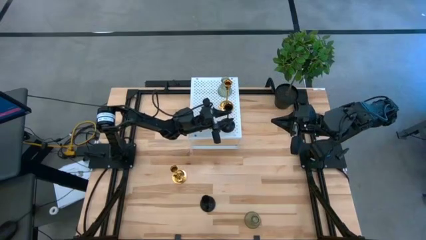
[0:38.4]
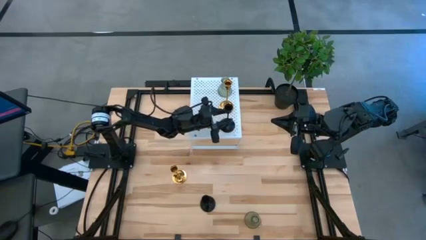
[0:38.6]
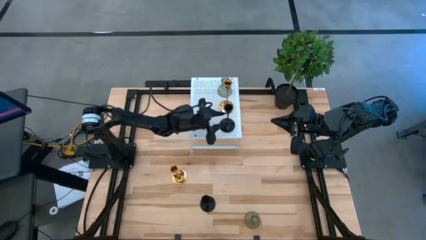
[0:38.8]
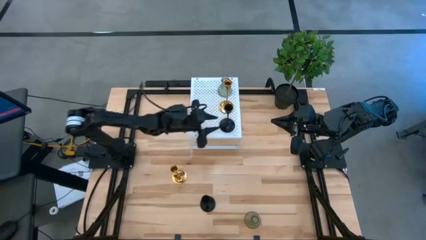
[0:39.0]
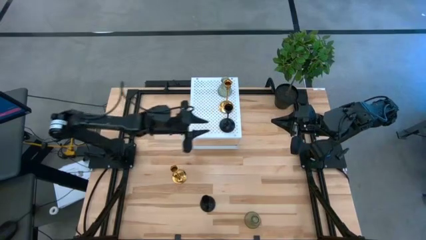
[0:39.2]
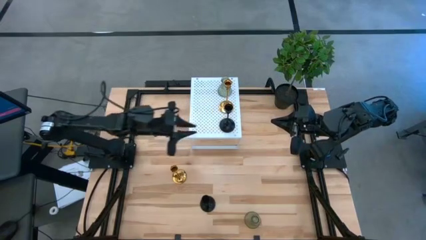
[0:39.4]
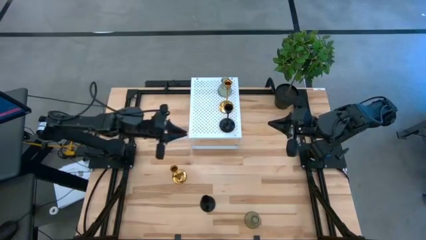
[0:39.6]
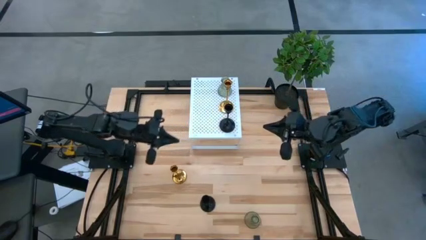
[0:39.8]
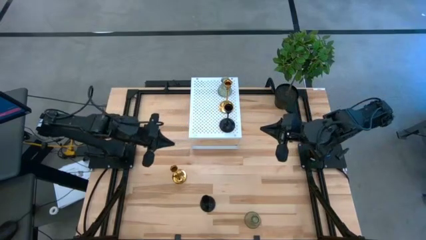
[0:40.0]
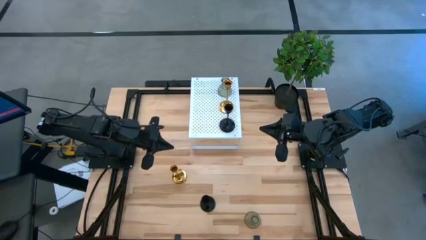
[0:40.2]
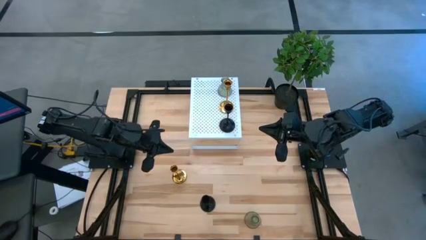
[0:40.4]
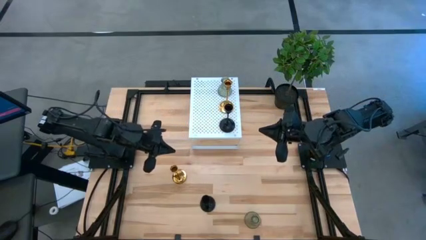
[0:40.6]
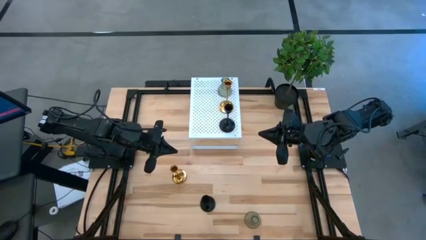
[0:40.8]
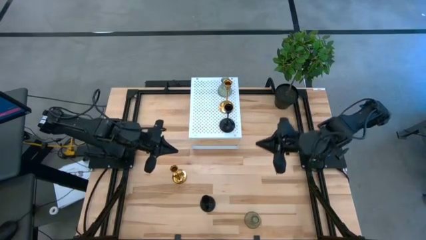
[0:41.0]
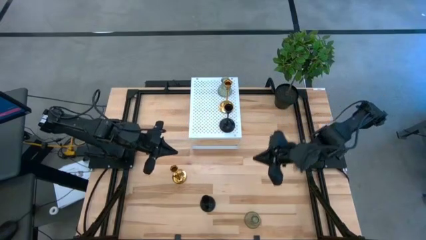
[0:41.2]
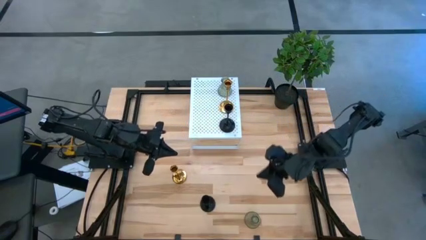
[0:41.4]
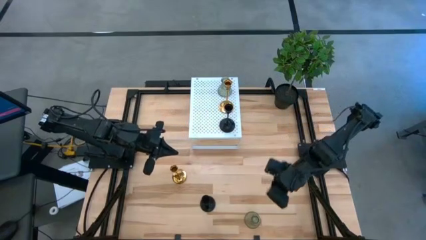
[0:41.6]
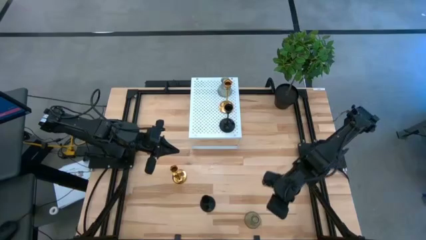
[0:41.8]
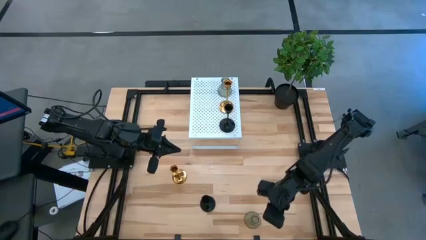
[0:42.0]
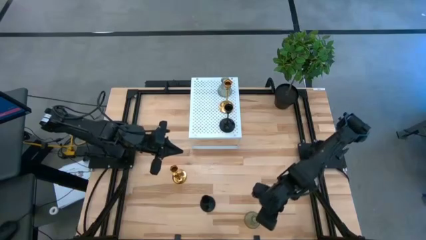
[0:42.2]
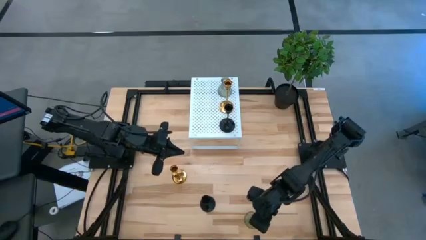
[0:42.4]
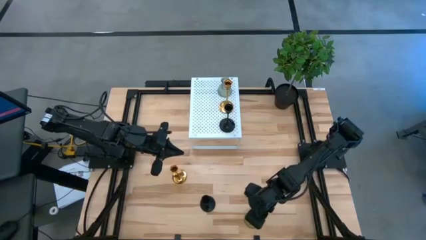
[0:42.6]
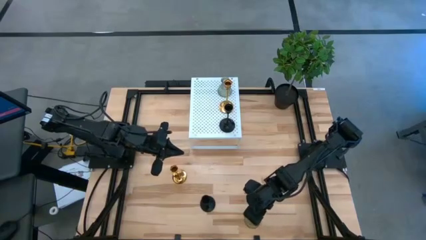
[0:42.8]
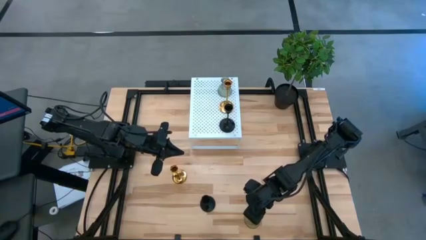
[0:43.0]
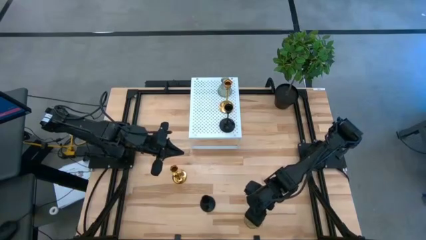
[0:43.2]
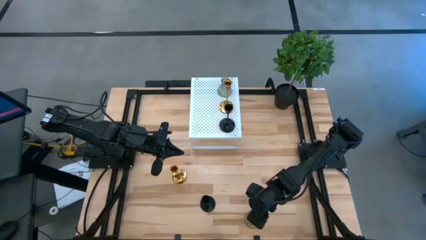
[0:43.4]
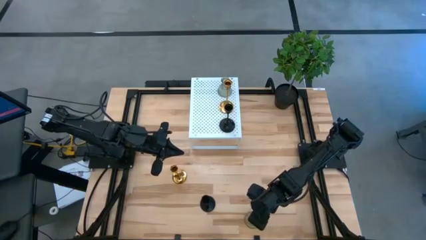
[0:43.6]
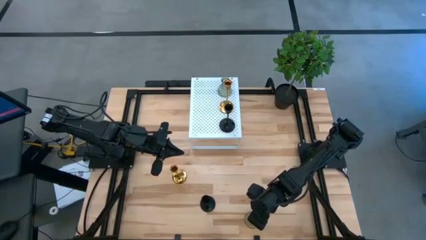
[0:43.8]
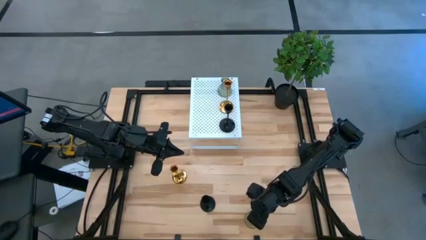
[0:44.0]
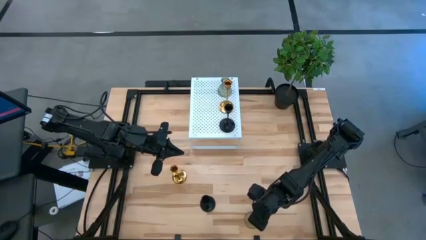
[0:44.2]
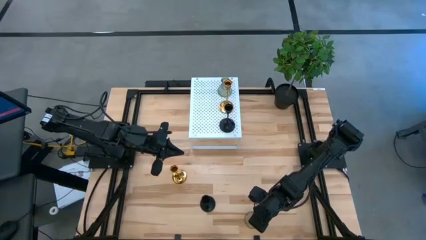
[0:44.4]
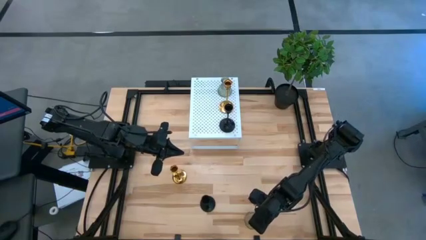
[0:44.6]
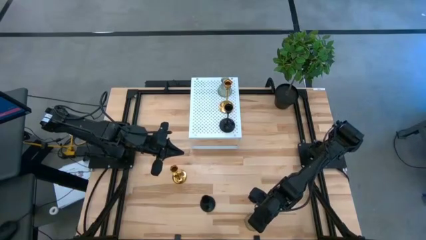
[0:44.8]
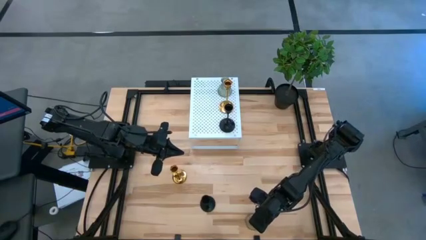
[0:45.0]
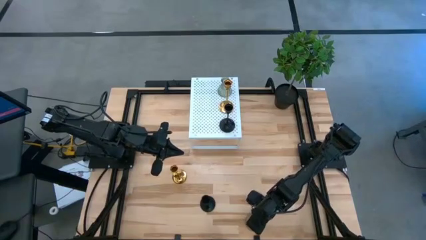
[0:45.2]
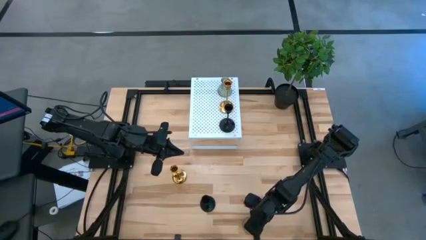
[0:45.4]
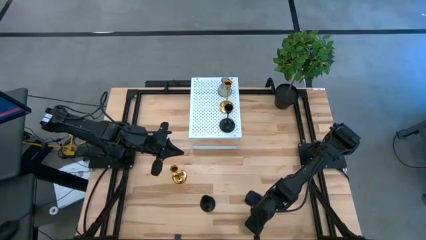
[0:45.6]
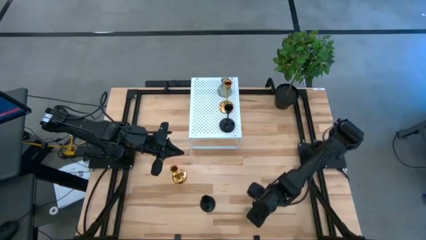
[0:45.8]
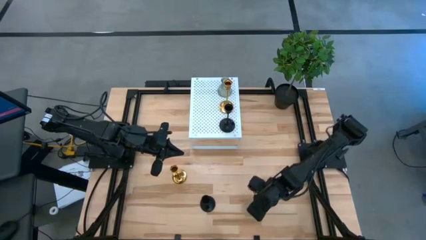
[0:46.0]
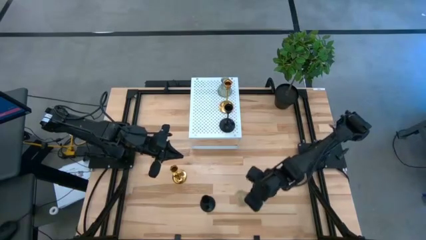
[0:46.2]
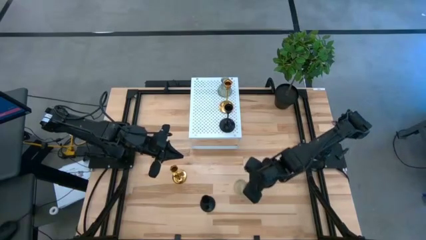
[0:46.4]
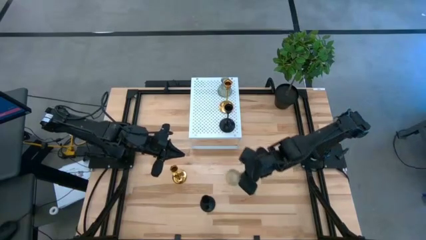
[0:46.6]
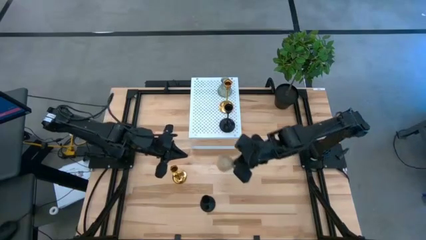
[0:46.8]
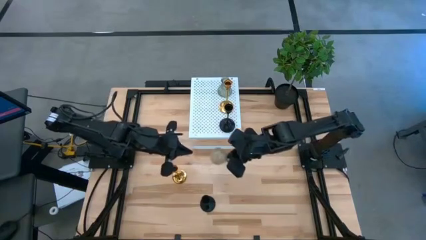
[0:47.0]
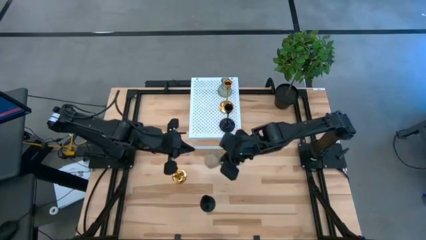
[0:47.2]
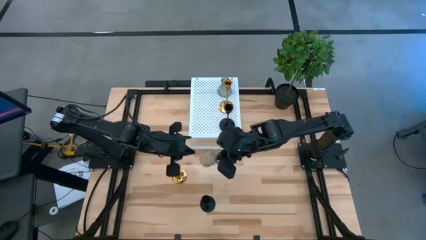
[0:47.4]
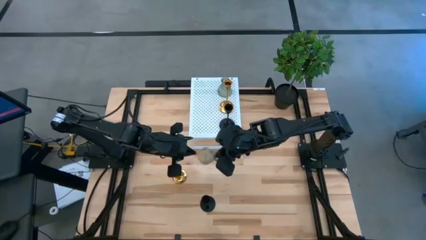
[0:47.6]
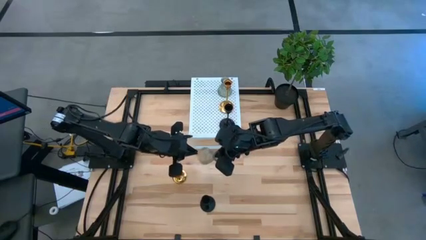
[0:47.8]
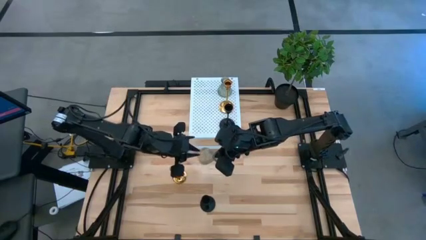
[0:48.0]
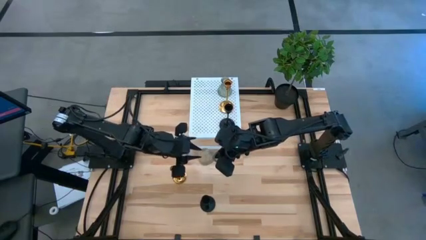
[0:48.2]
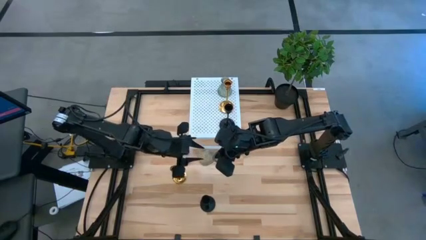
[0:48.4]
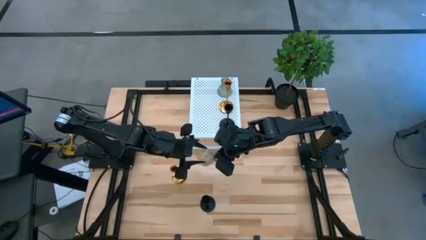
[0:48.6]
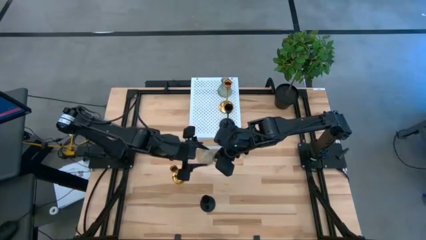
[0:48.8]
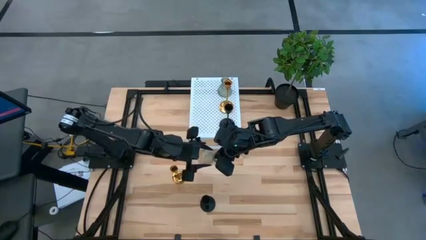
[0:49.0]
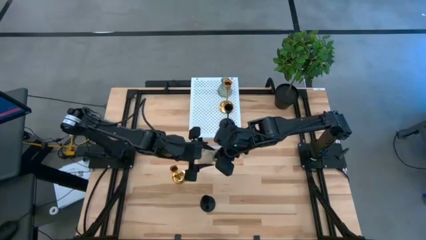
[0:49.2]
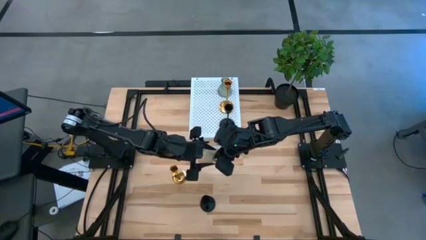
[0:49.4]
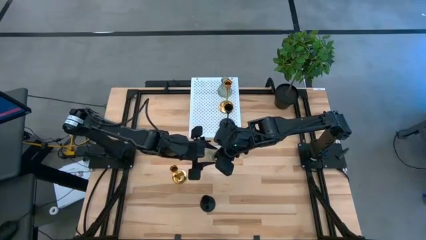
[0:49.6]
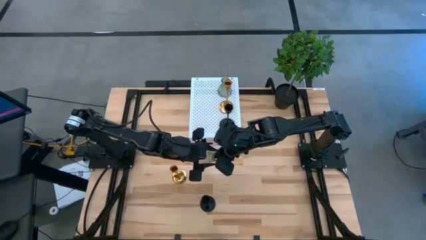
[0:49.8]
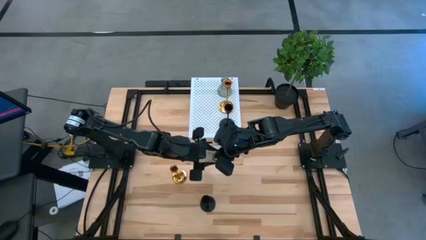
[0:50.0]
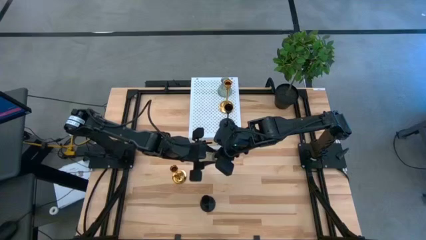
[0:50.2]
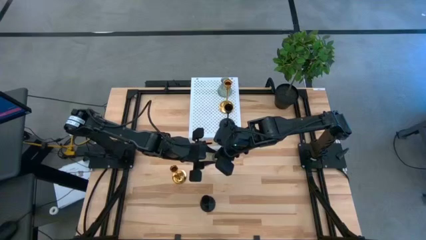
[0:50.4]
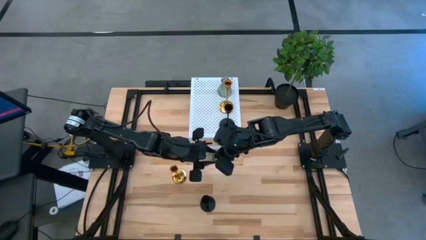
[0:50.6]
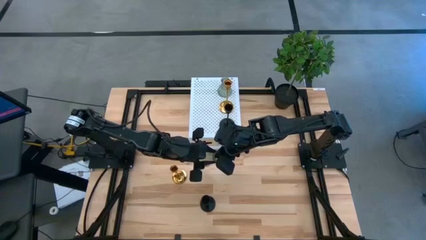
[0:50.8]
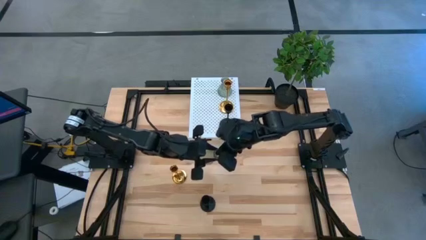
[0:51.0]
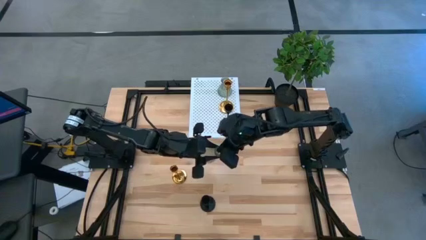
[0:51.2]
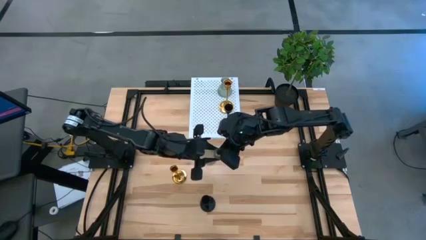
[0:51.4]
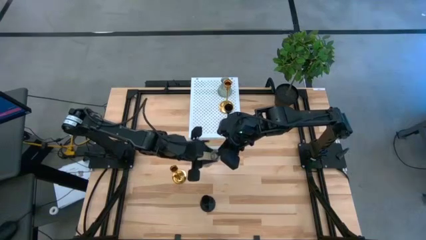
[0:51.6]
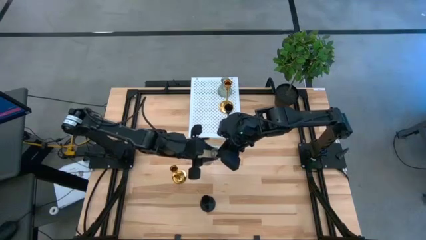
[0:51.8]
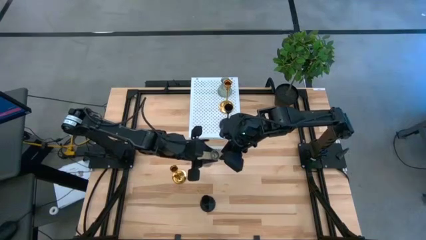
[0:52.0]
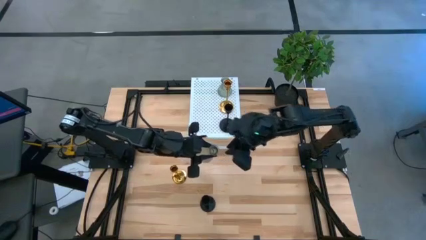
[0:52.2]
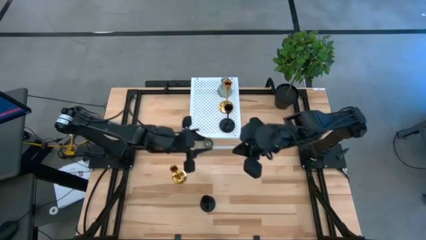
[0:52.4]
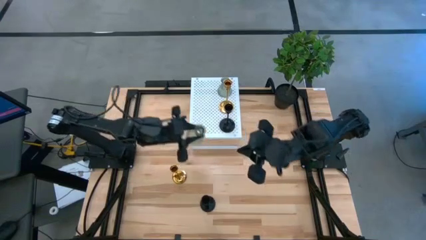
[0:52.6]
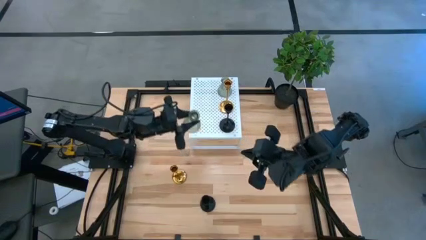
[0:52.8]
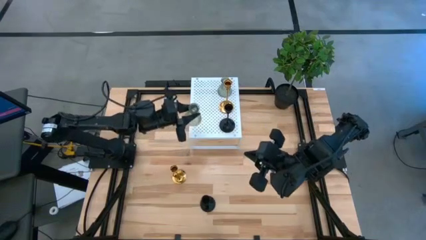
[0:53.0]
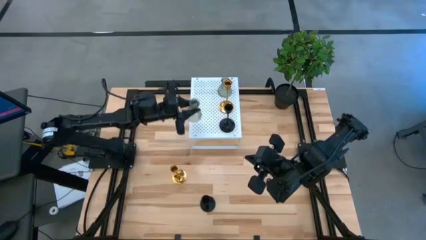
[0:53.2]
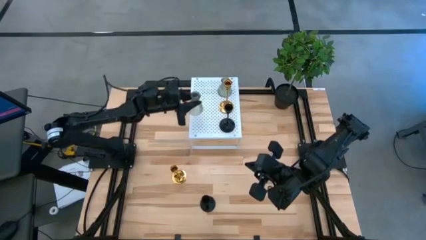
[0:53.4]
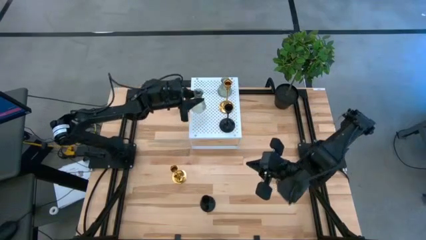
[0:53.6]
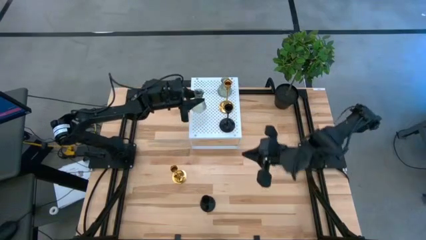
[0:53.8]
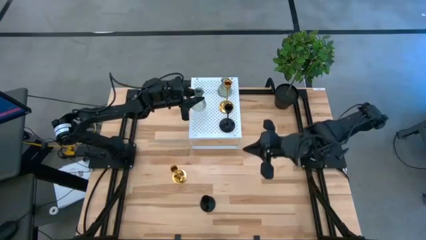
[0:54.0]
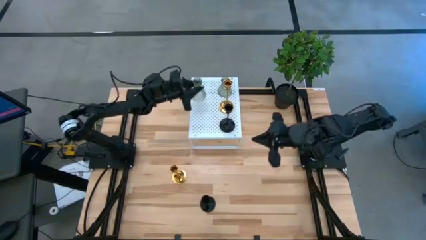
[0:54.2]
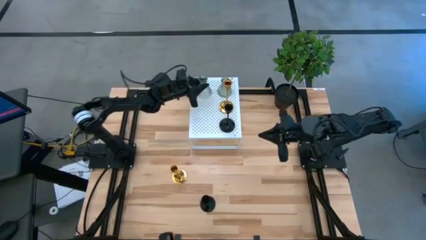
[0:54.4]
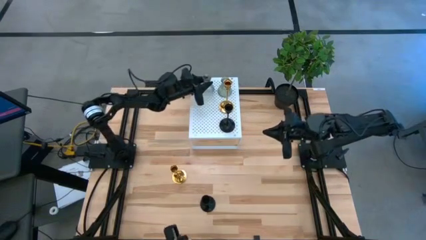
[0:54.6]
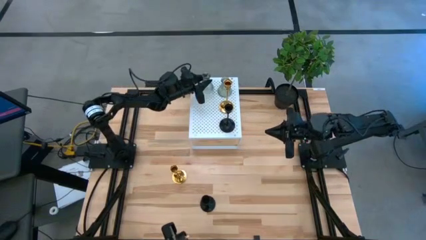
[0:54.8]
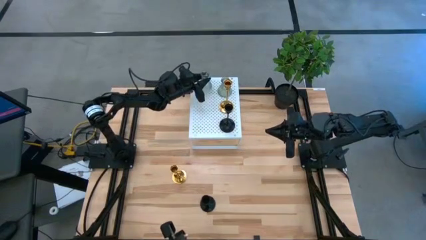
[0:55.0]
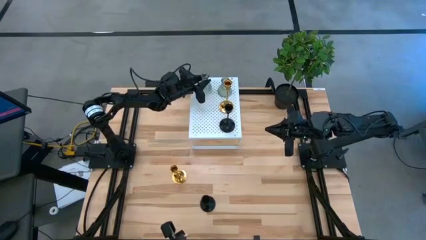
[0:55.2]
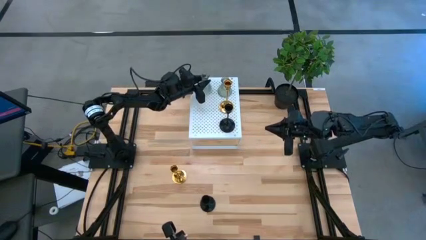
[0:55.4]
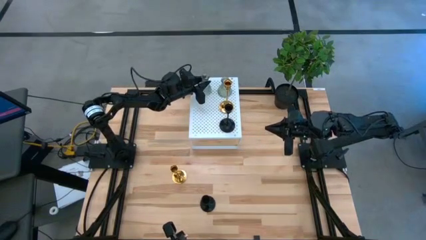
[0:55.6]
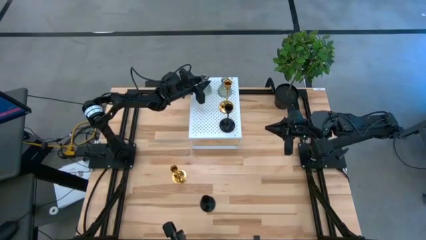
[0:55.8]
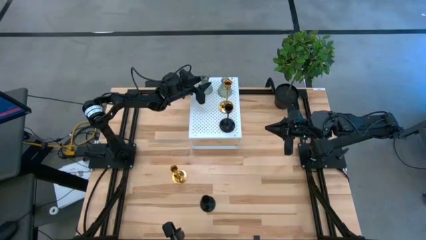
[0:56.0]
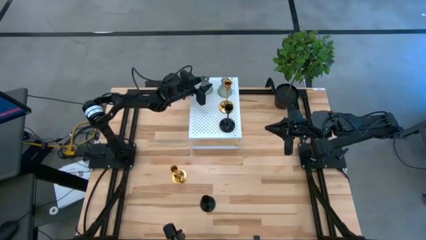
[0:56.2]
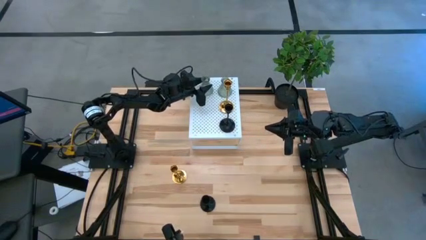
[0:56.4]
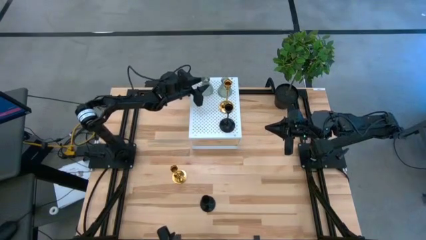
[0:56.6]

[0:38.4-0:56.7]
Task: Pick & Place candle stick holders
Put the green candle holder on the shelf
